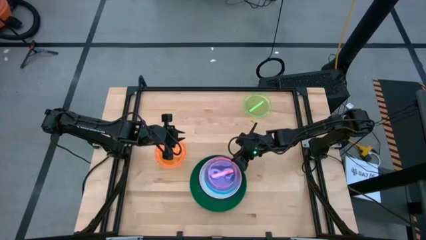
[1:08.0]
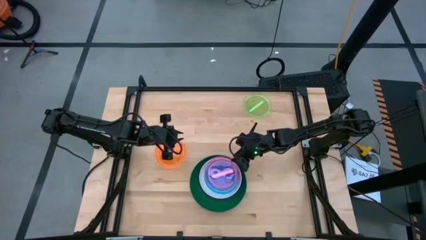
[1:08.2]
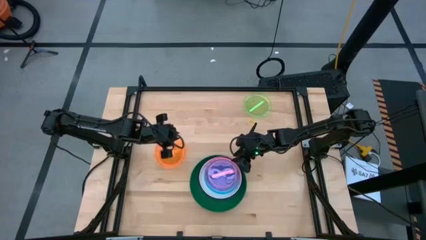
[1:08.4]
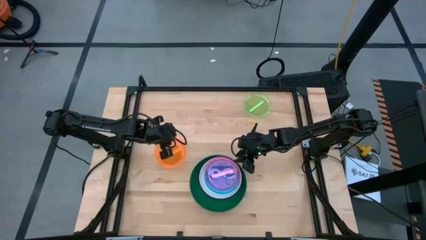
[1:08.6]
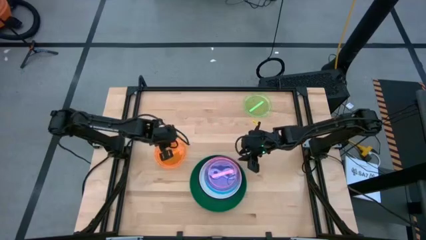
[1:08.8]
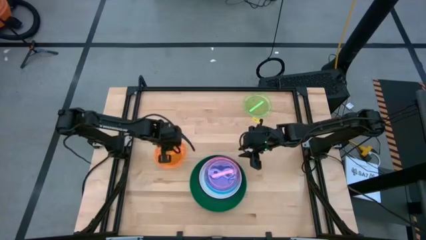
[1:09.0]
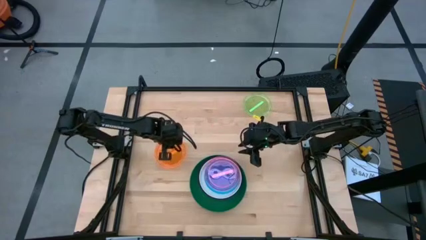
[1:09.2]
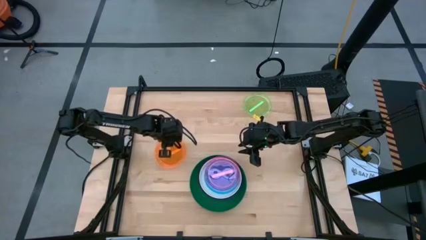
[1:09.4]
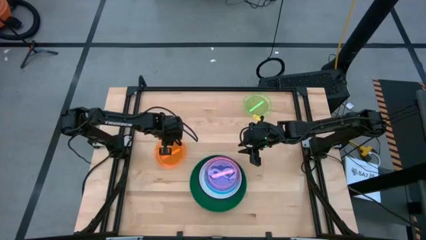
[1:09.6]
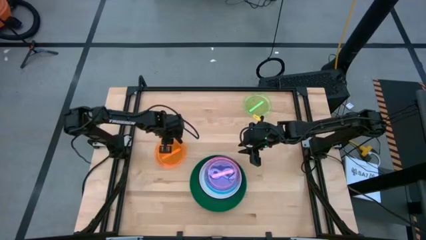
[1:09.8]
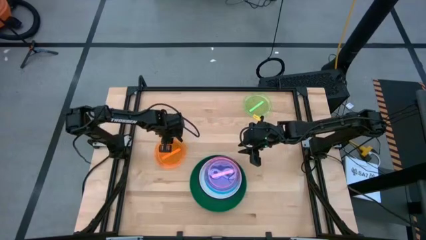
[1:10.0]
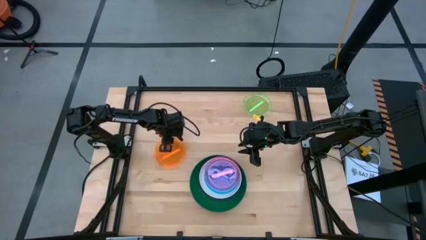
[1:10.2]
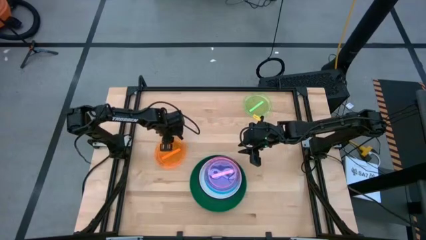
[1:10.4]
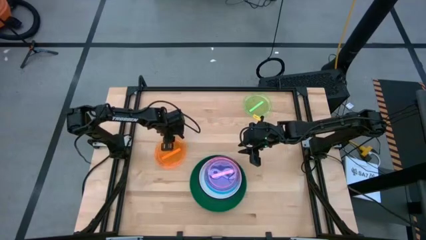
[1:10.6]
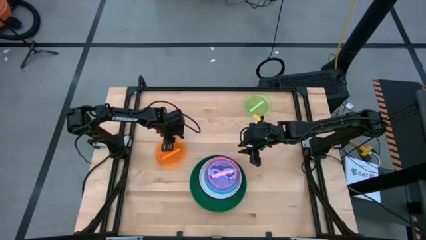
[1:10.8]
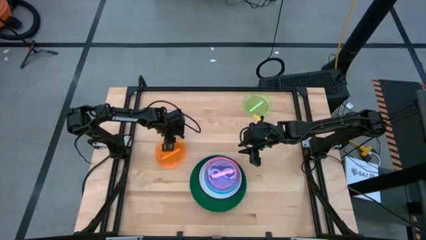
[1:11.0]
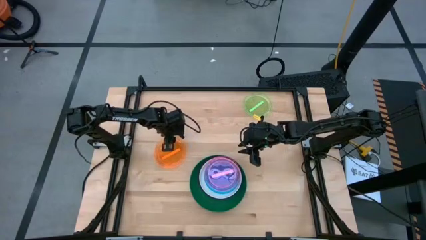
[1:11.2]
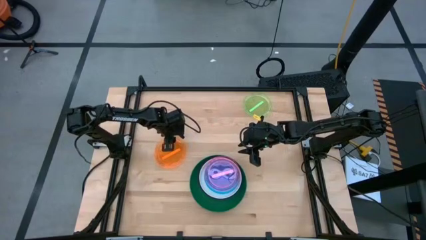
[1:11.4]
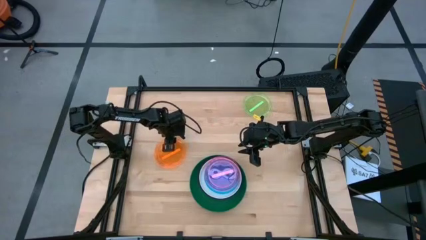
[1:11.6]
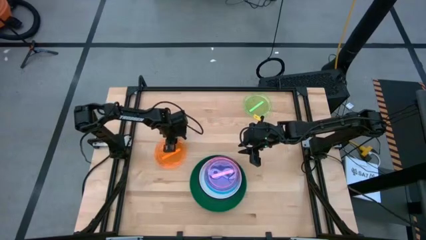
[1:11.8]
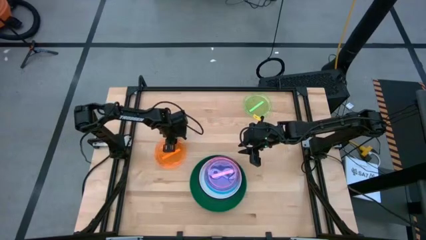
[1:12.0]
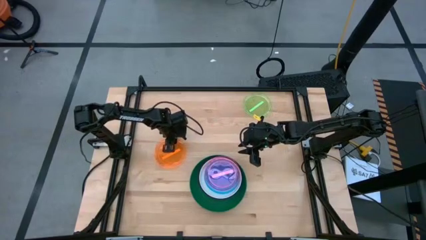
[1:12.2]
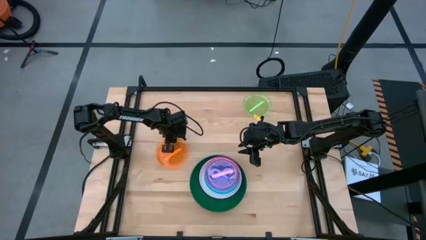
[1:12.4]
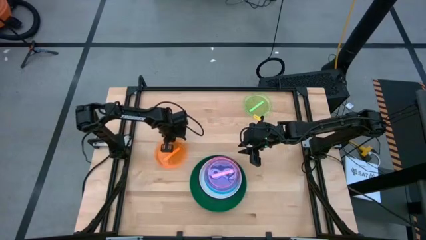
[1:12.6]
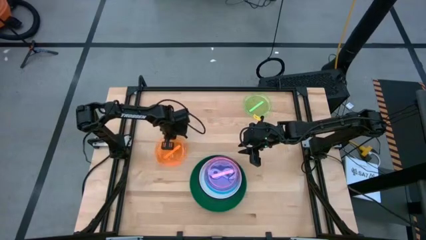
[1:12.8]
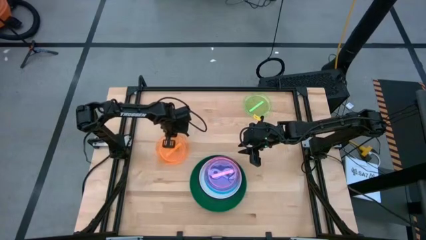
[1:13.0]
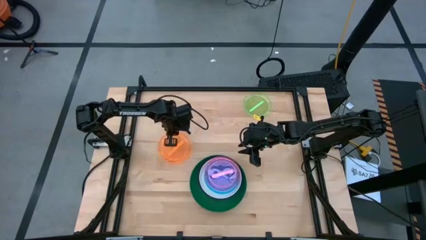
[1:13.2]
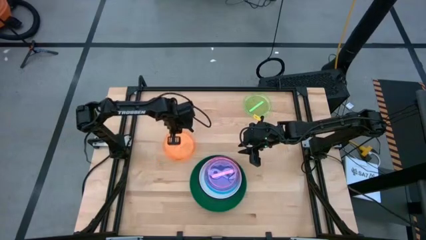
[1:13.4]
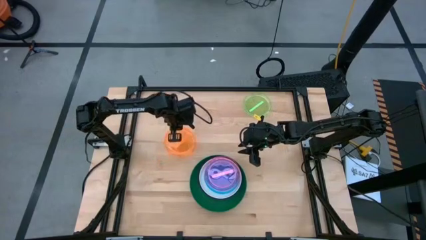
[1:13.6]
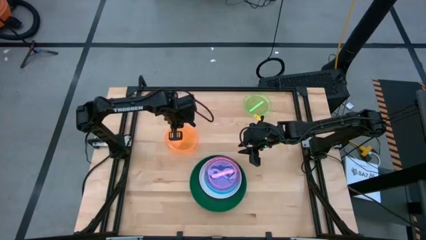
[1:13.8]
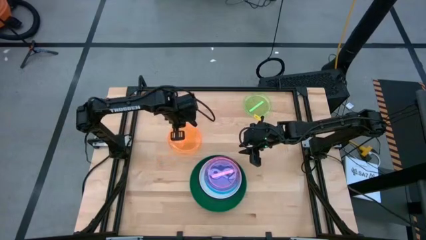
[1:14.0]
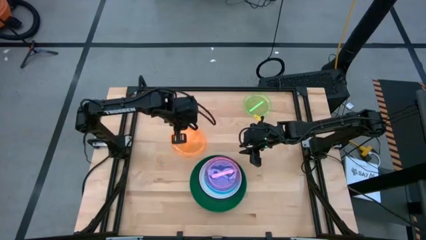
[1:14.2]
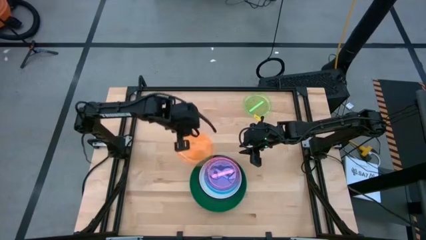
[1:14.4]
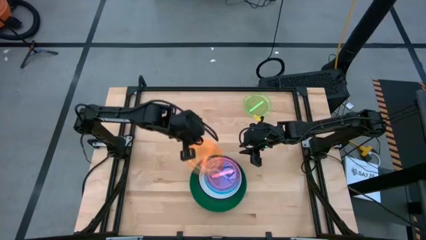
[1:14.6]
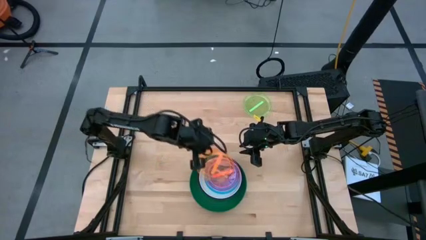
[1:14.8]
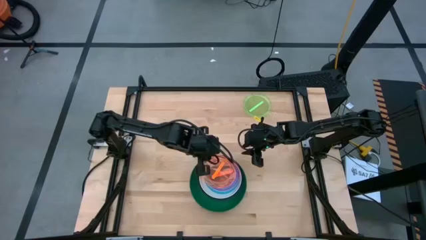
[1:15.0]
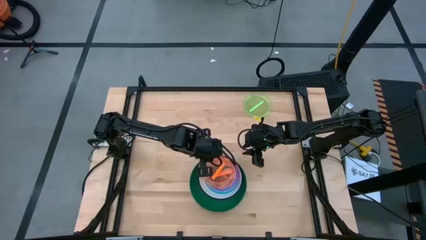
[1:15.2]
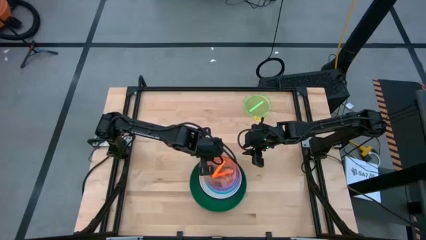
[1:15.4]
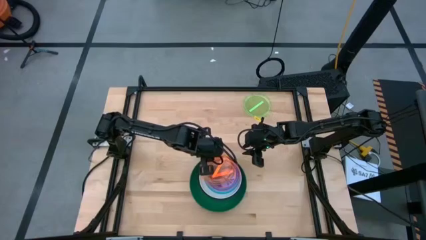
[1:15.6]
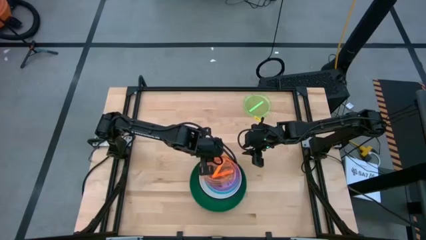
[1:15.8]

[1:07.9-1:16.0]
Task: Stack plastic plates
Stack the orange plate on top of the pink plate

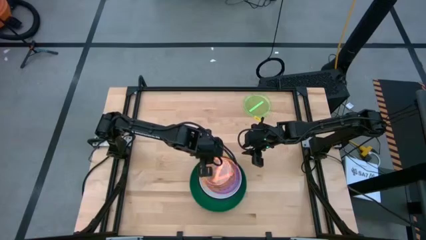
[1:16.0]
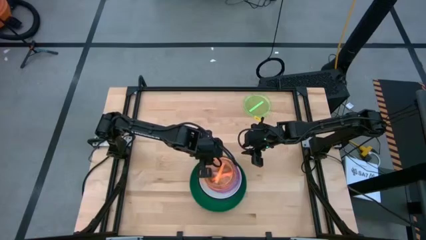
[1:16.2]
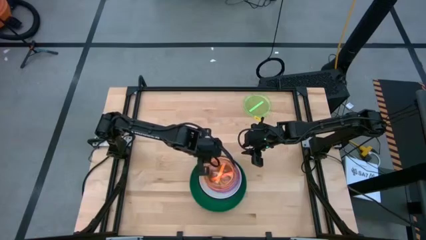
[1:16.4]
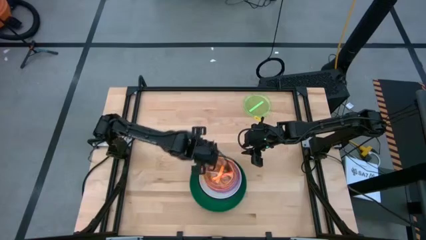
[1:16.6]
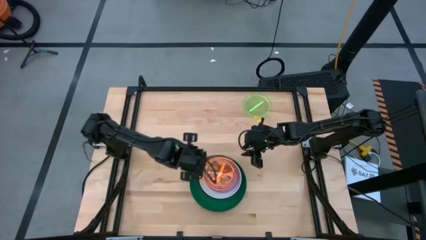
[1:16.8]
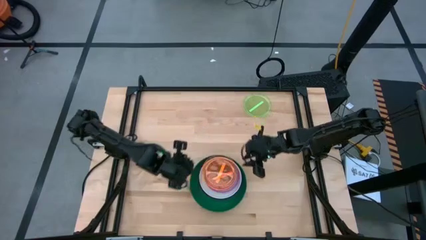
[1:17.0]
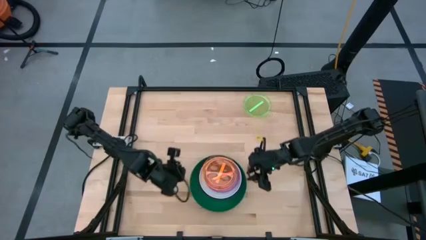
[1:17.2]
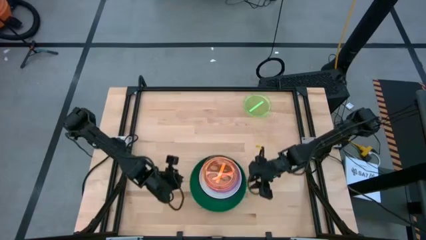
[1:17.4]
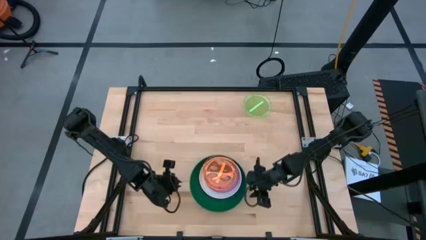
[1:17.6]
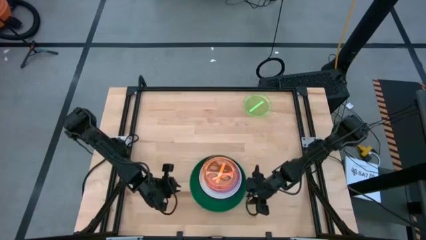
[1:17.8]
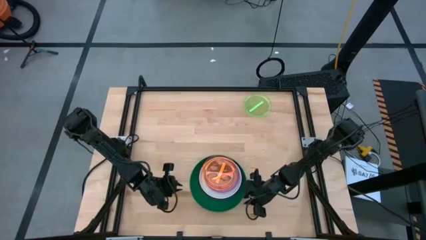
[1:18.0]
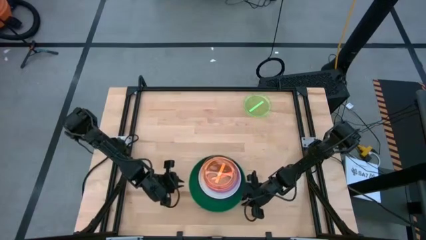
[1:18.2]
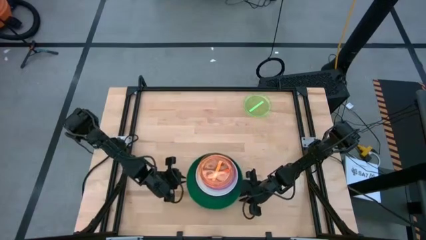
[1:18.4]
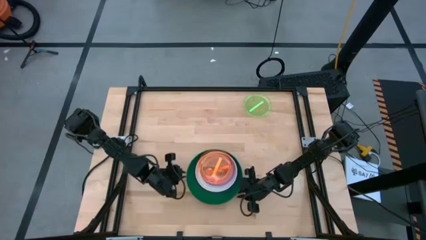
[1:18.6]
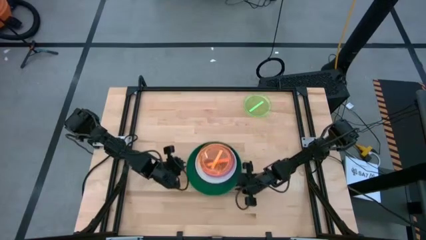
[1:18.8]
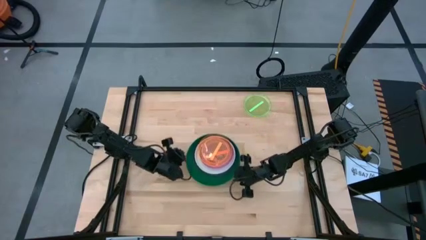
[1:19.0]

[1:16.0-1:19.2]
Move the stacked plates to the center of the table

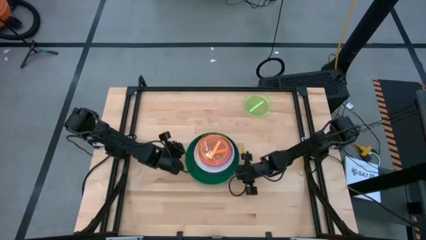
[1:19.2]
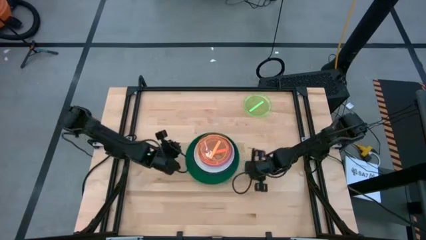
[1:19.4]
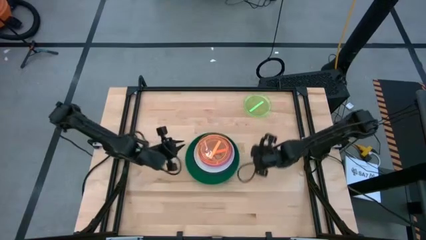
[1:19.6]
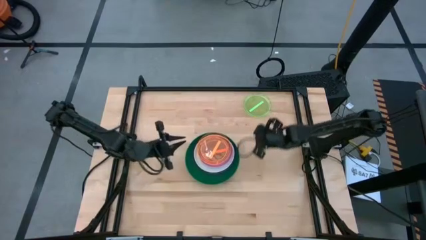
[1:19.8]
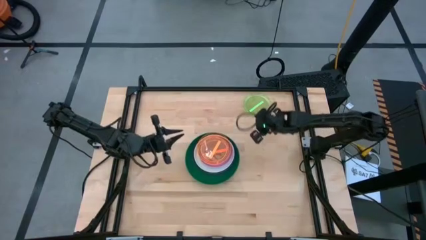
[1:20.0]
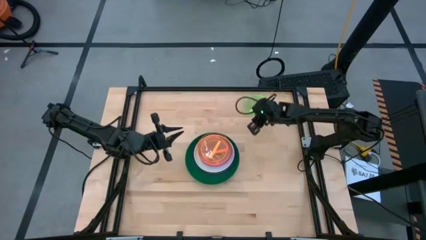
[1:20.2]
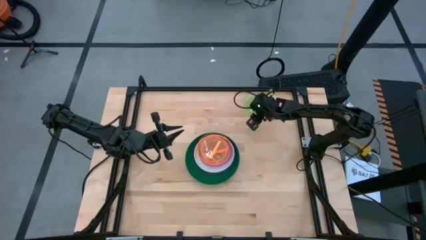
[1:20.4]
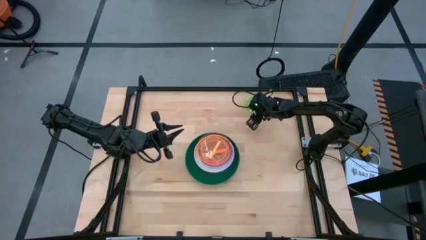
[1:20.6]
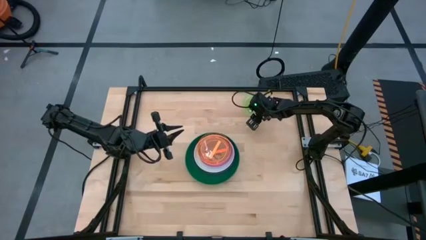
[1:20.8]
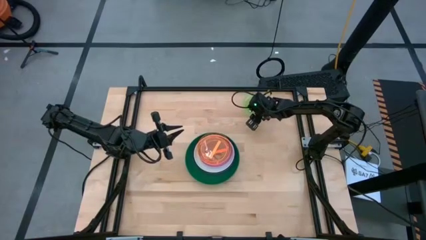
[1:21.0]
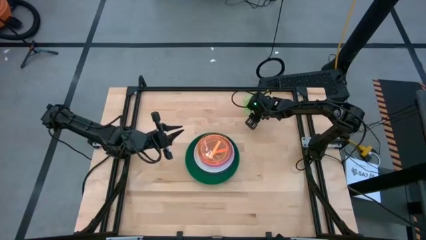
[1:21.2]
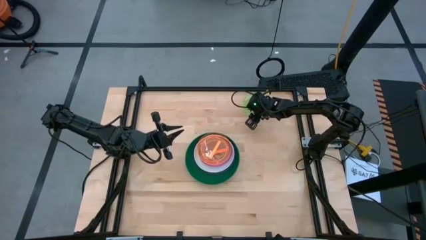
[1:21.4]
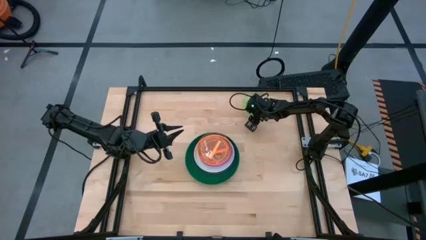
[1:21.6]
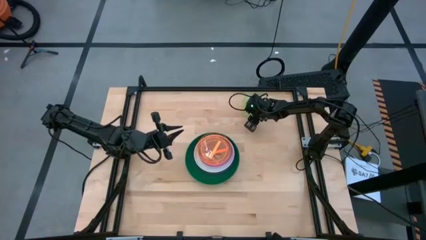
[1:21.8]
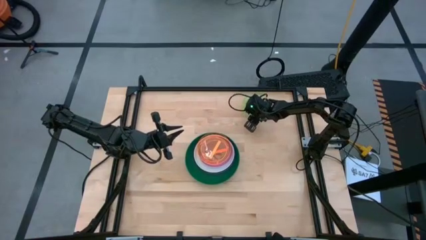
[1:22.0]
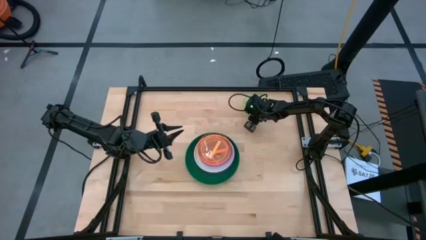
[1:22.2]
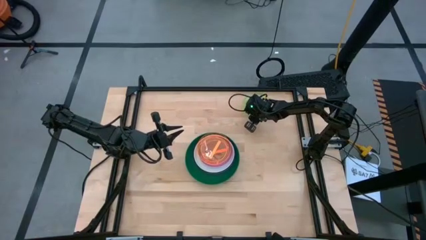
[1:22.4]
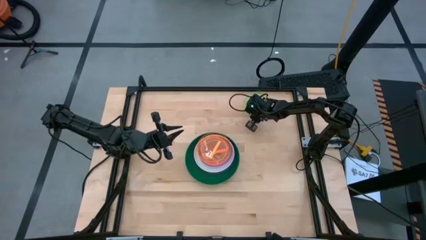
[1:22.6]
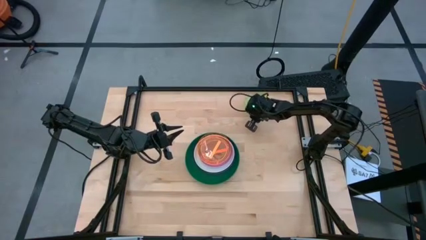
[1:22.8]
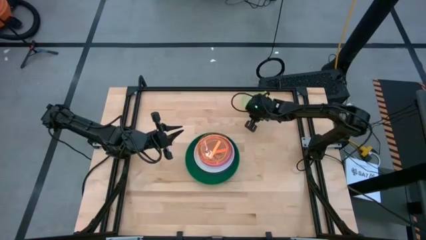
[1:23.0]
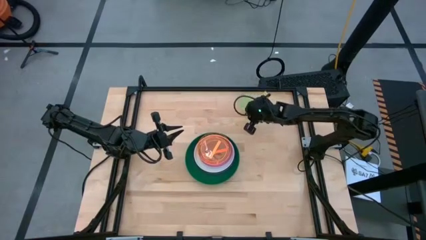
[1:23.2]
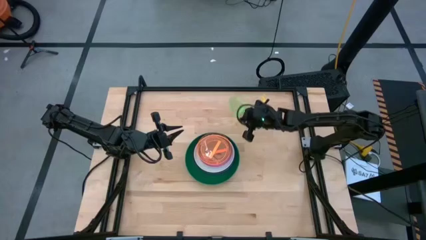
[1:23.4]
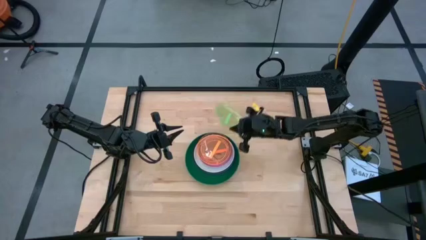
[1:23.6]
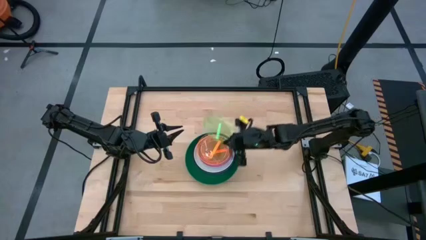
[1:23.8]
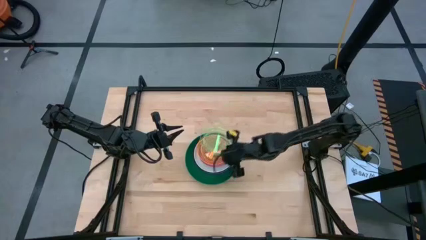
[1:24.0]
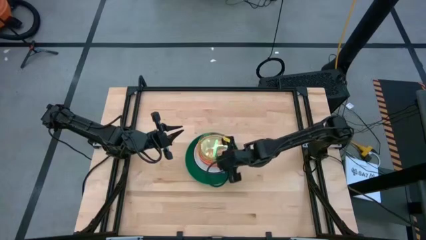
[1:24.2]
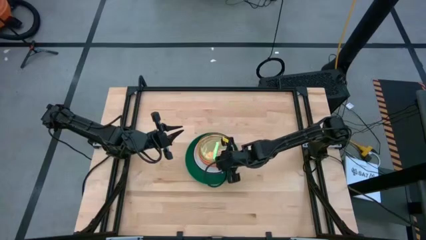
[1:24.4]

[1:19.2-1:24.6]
Stack the light green plate on top of the orange plate
